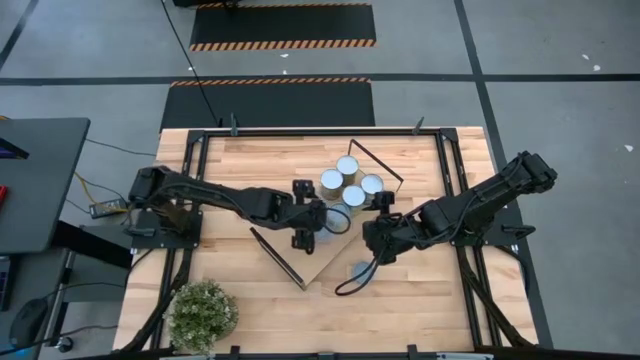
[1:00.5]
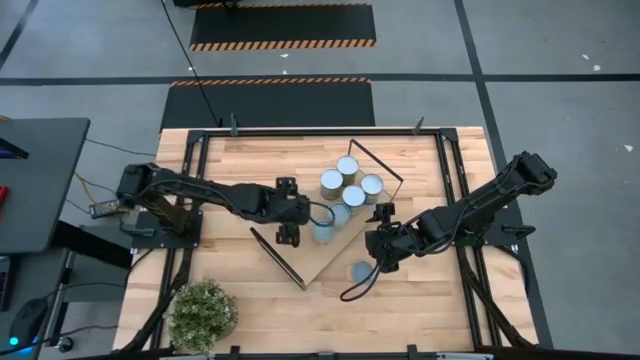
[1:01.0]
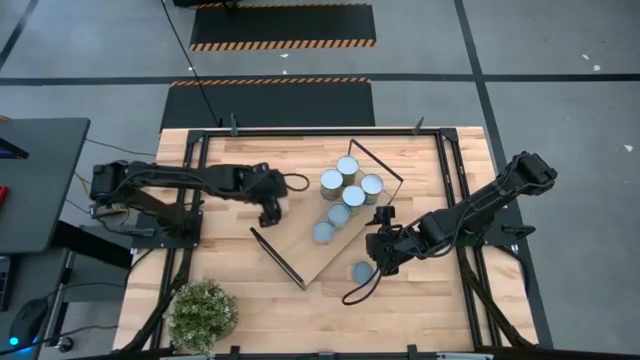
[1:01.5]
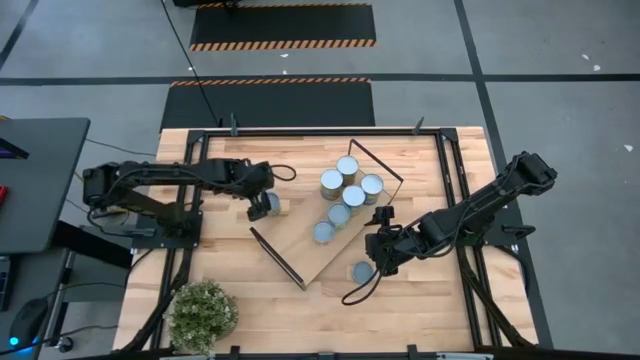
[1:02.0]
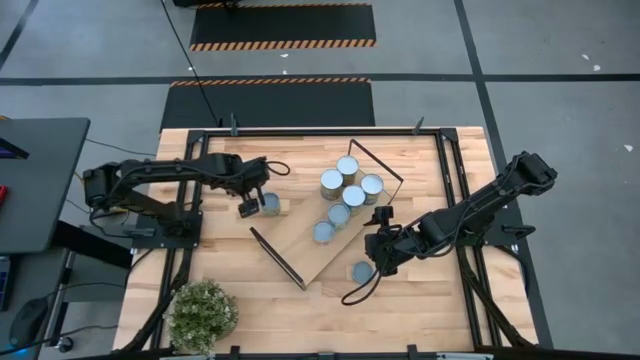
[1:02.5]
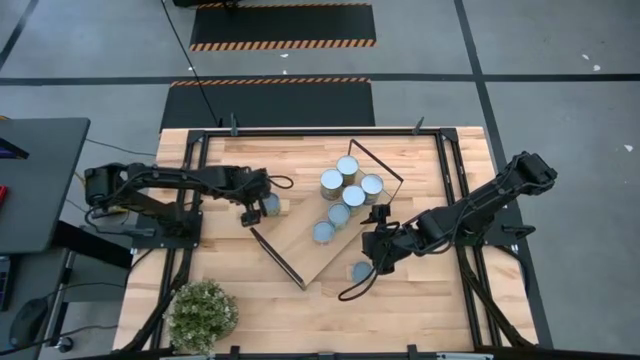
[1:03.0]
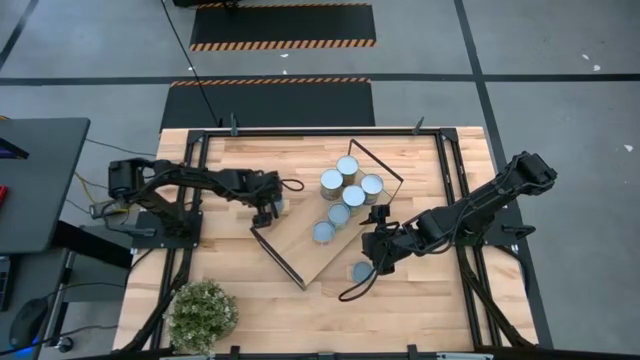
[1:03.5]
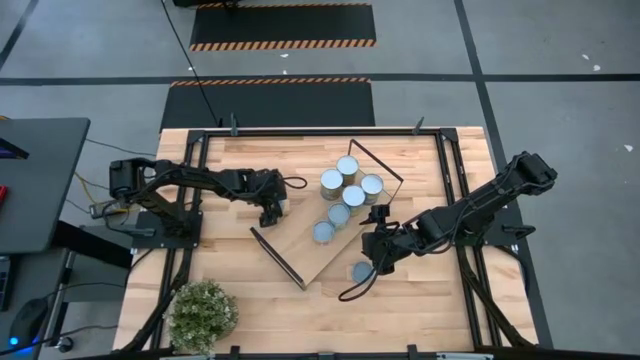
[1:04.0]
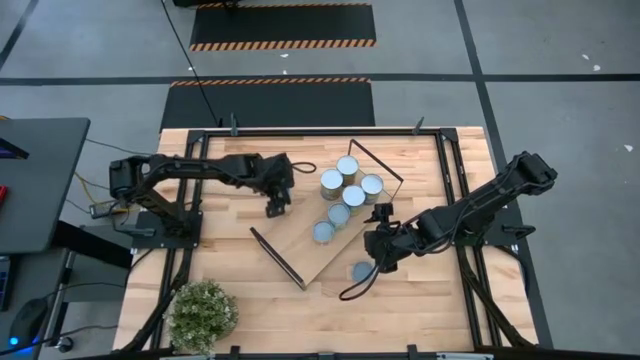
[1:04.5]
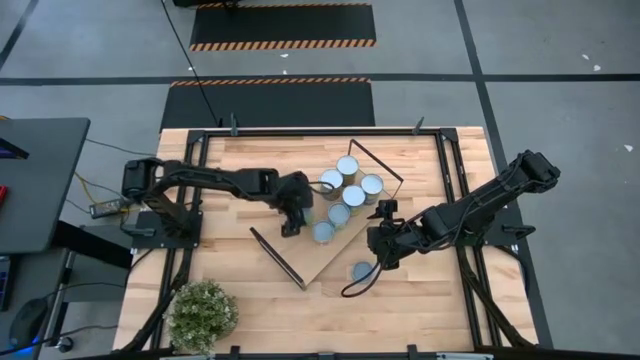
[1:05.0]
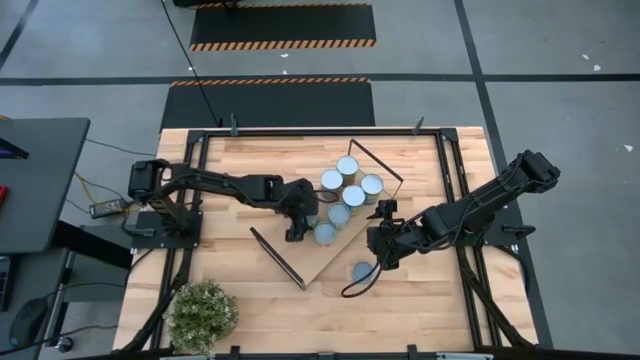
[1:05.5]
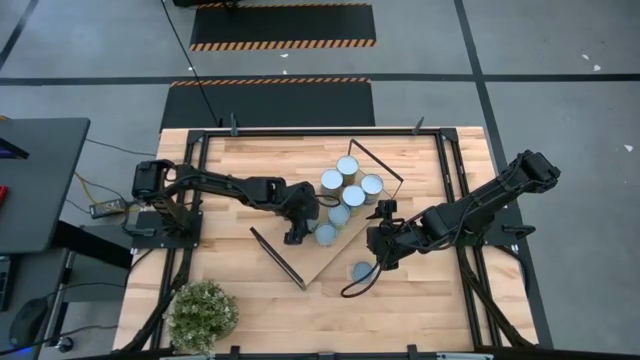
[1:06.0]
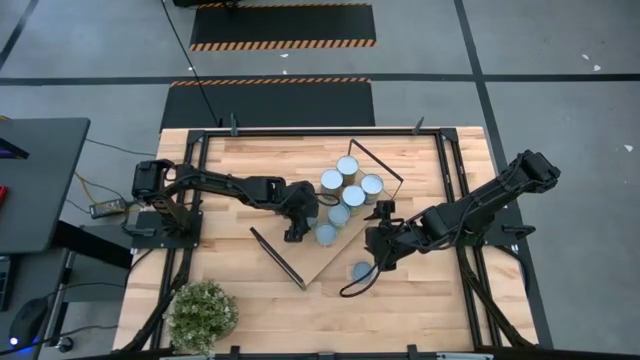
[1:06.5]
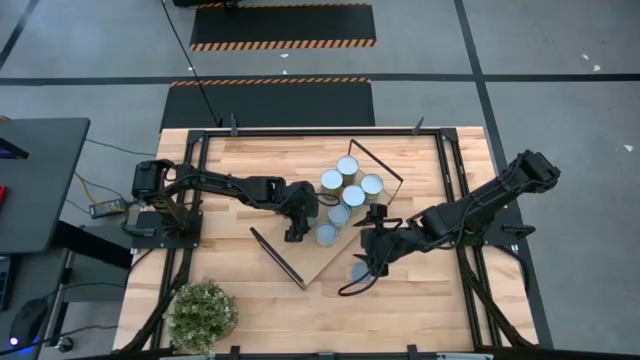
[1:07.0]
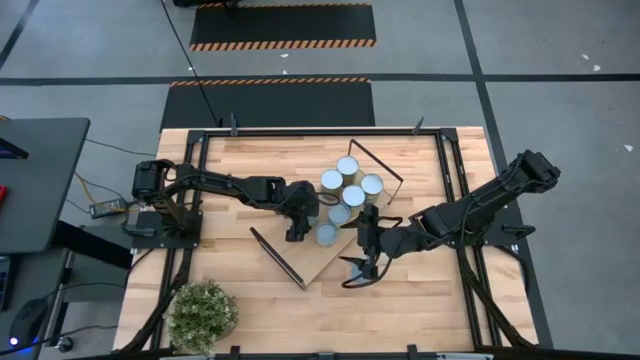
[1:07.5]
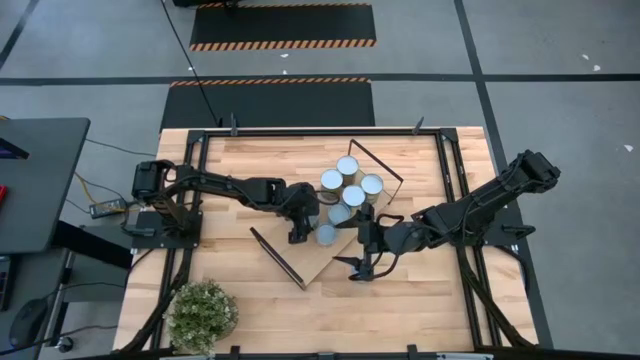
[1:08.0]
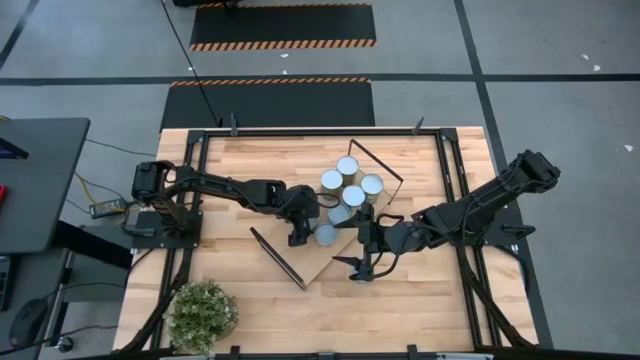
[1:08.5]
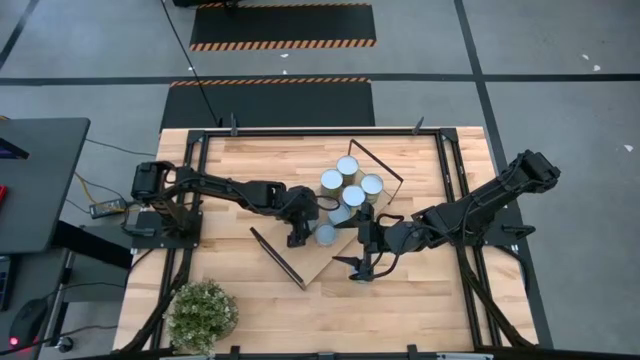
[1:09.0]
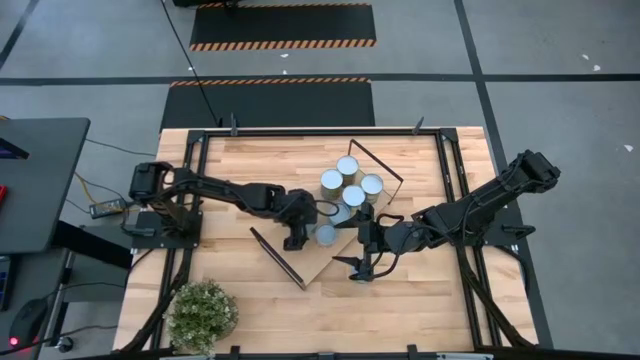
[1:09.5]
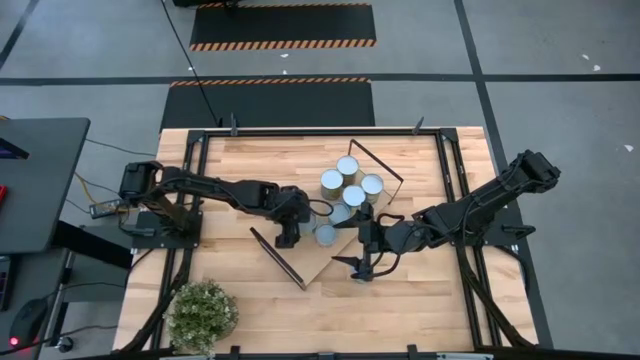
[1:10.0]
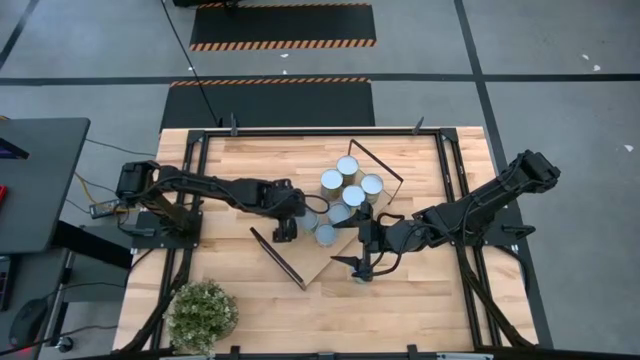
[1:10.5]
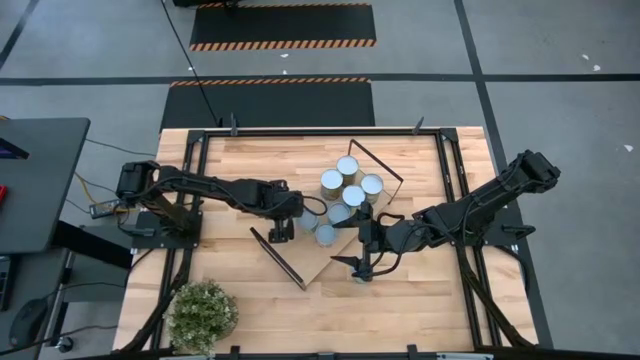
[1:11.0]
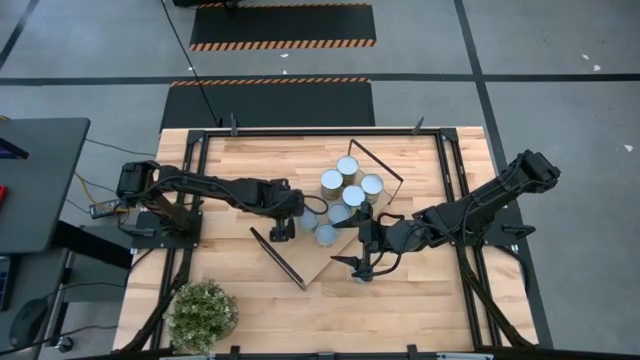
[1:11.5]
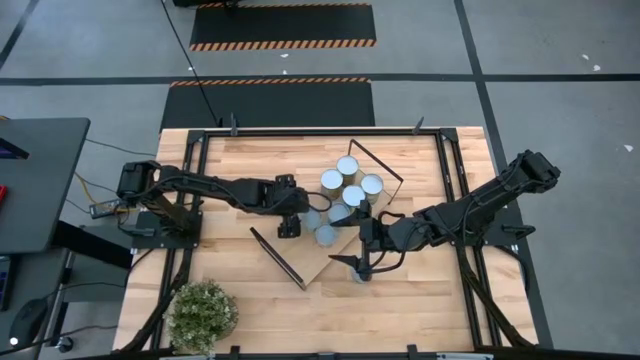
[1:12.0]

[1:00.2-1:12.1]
Task: Pick and place cans onto a shelf
Put the green fruit can on the shelf aligned with the red fruit can

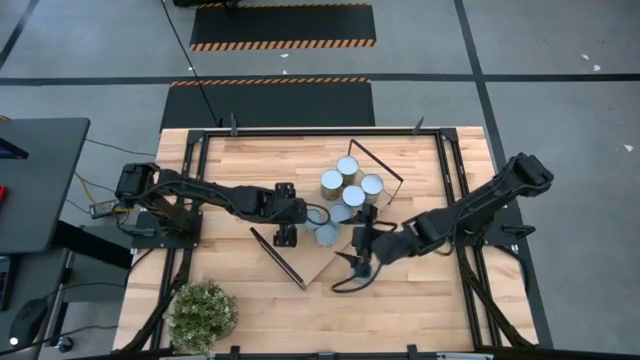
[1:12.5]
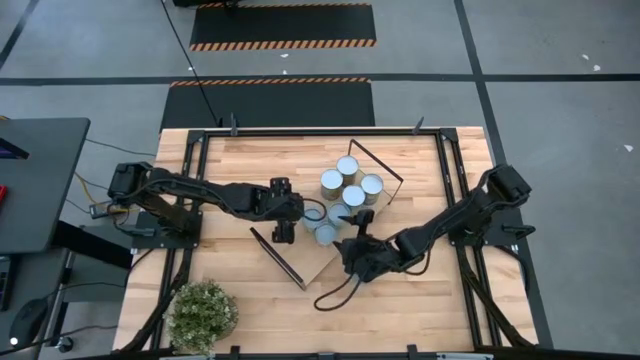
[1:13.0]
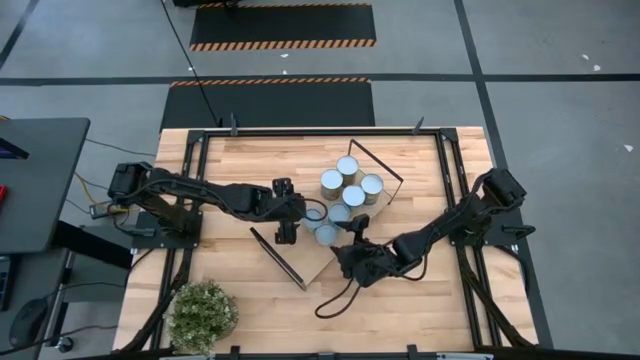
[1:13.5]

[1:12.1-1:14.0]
Adjust the red fruit can on the shelf

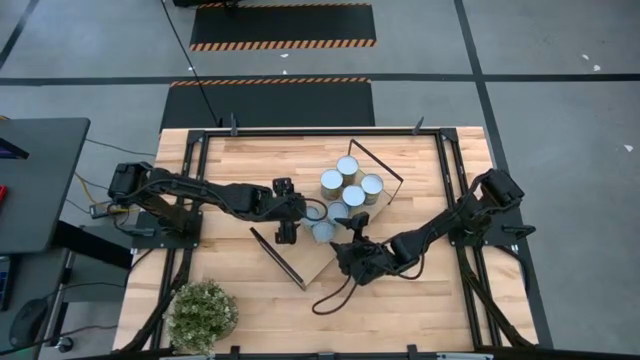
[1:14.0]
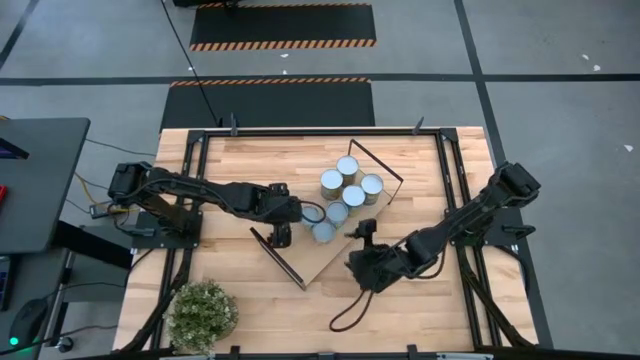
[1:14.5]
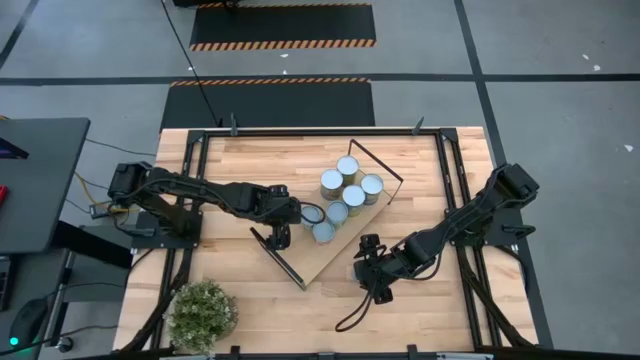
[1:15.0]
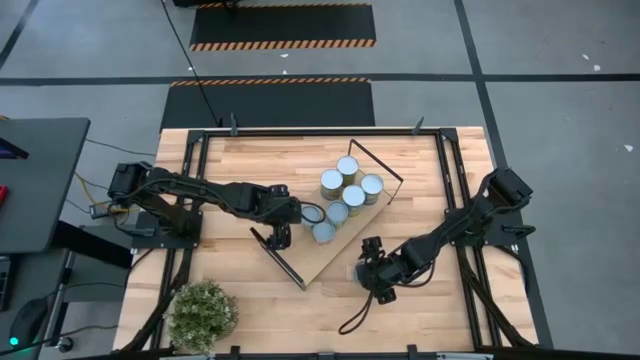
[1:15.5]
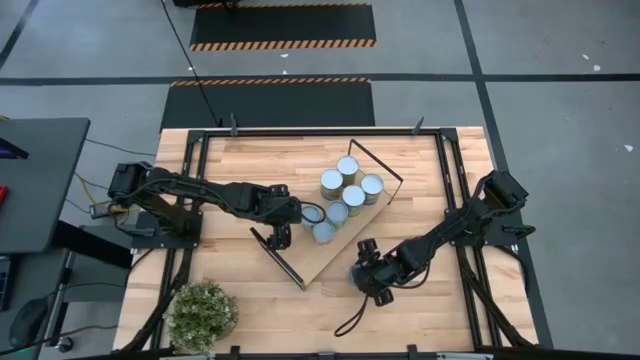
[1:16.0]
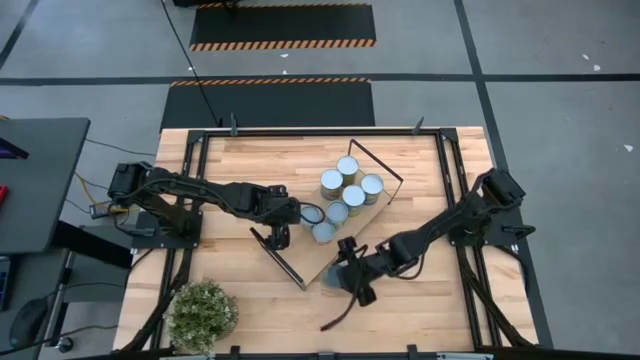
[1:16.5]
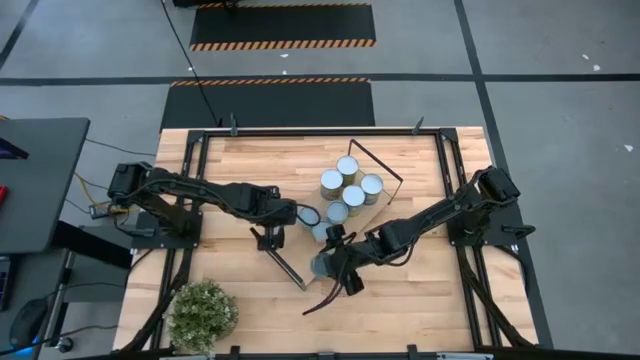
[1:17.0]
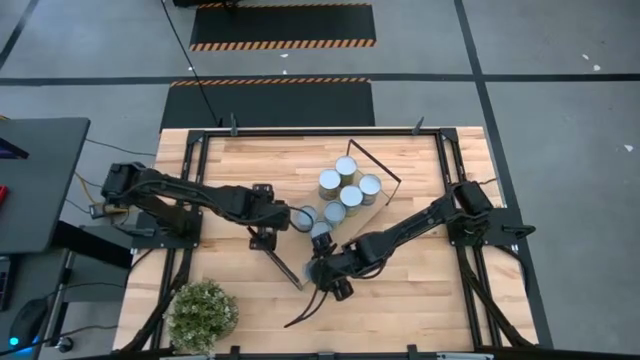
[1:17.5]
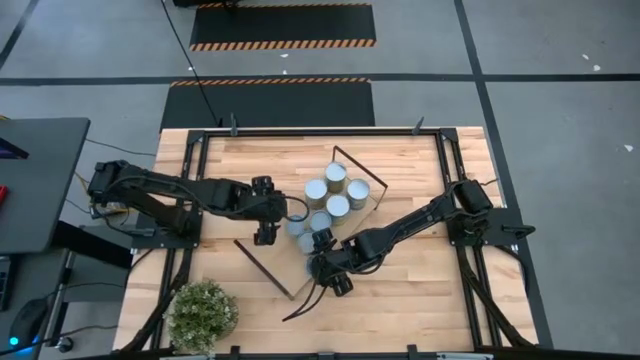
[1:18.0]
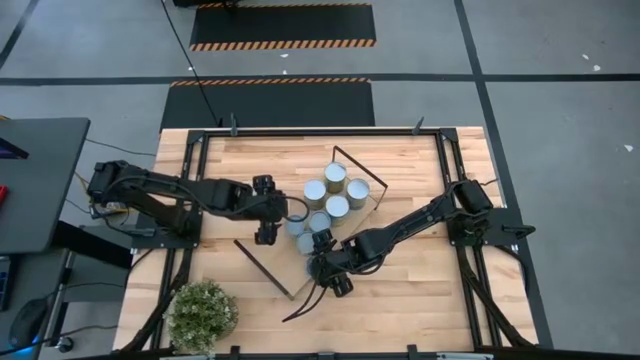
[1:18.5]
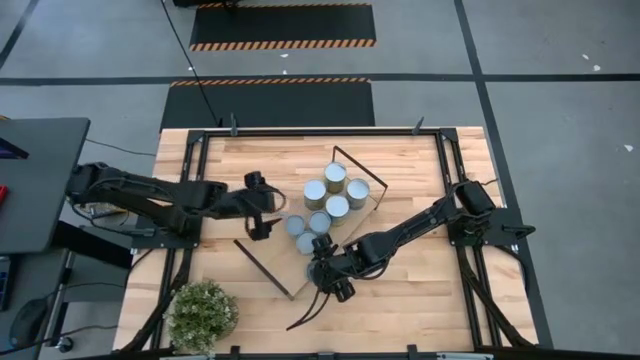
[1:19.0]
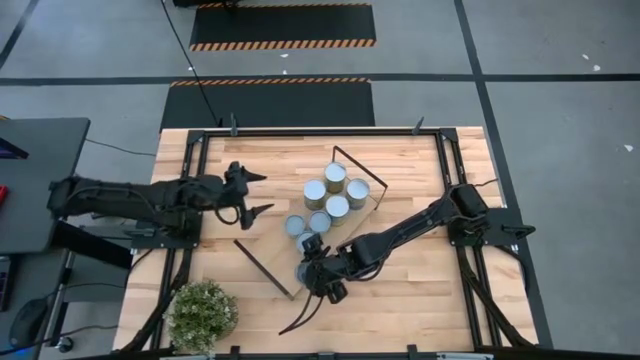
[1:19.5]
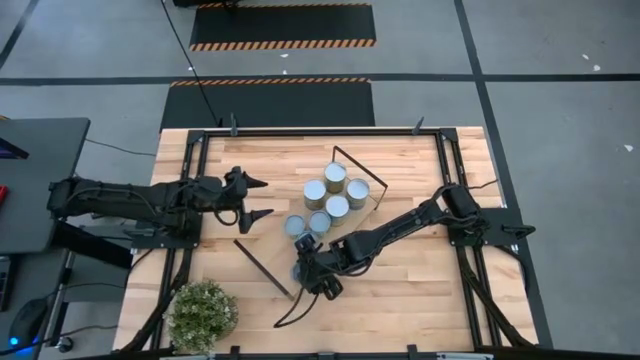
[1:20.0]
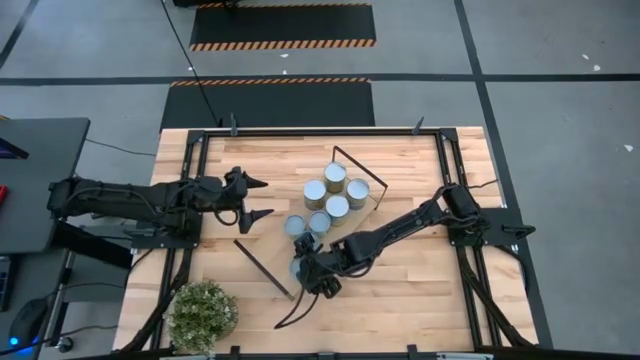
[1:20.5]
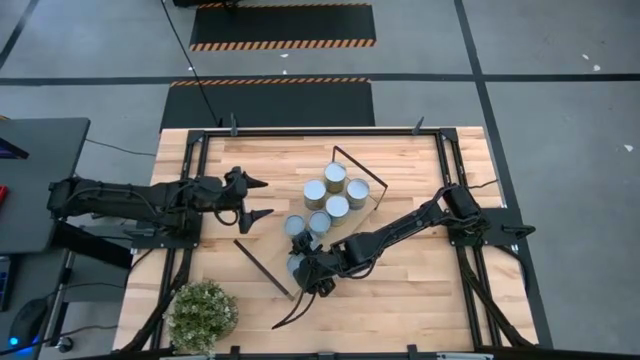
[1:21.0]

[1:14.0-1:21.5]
Put the blue tuna can on the shelf
